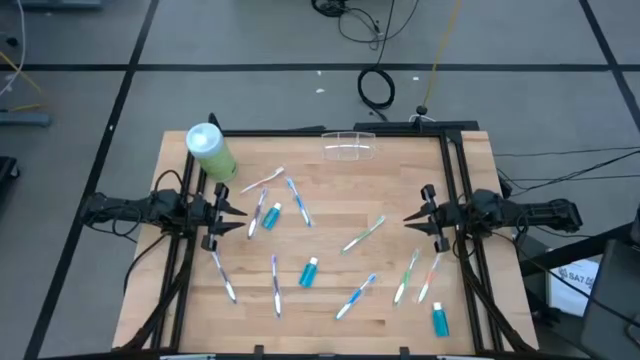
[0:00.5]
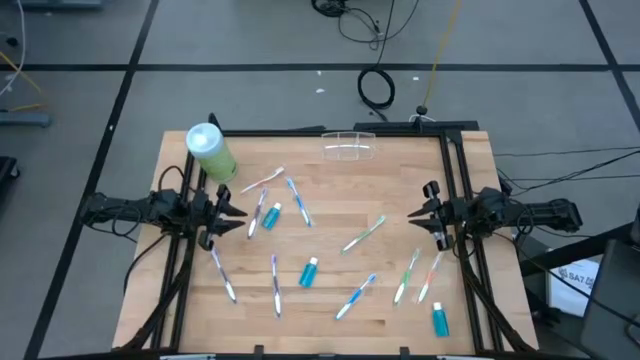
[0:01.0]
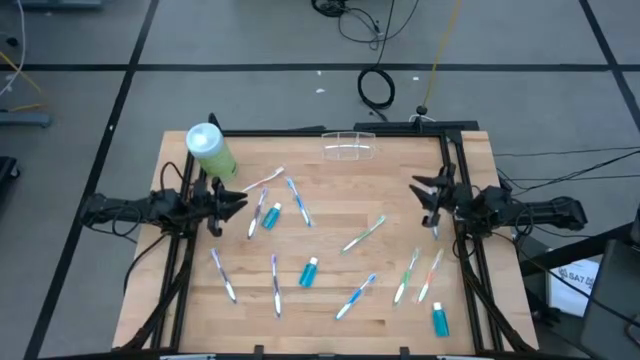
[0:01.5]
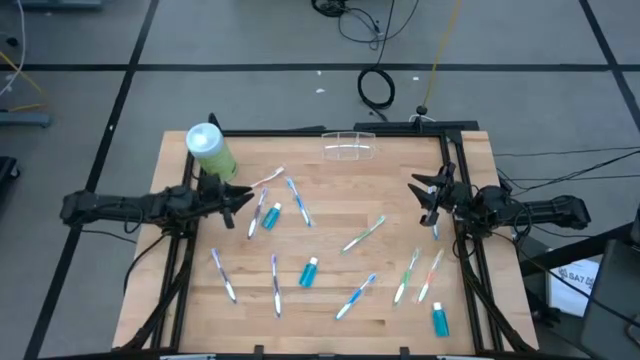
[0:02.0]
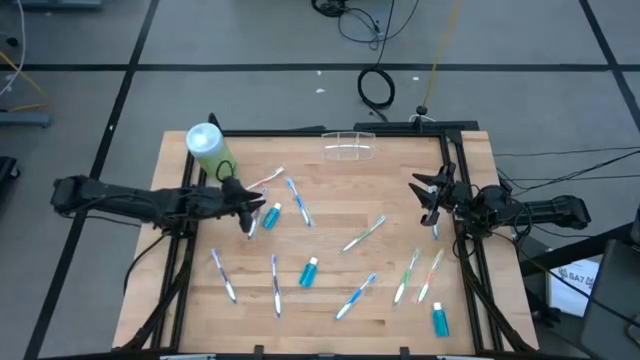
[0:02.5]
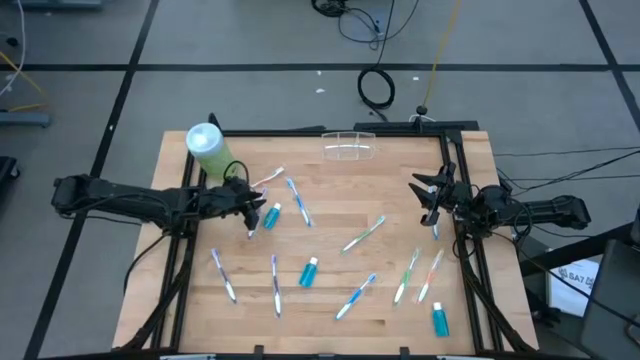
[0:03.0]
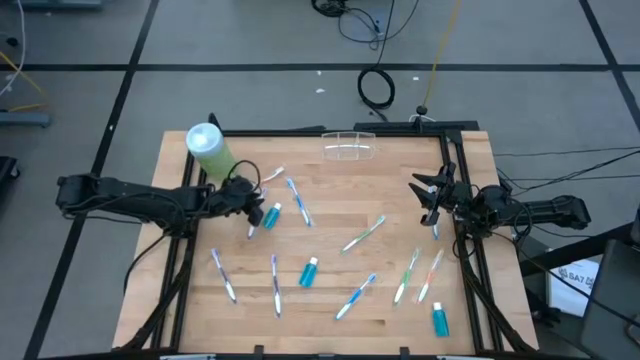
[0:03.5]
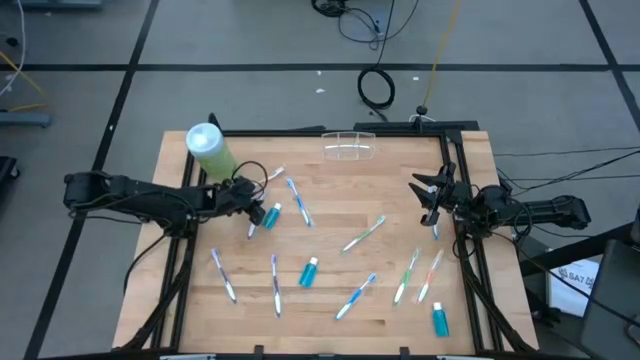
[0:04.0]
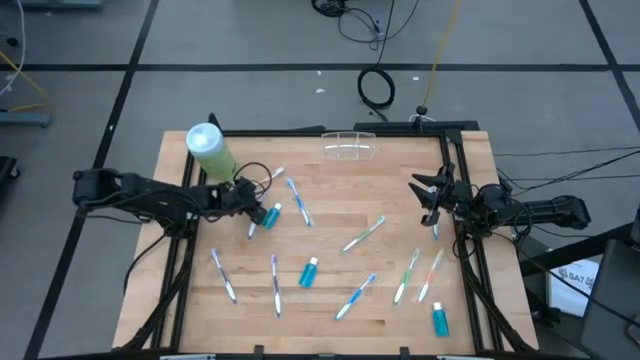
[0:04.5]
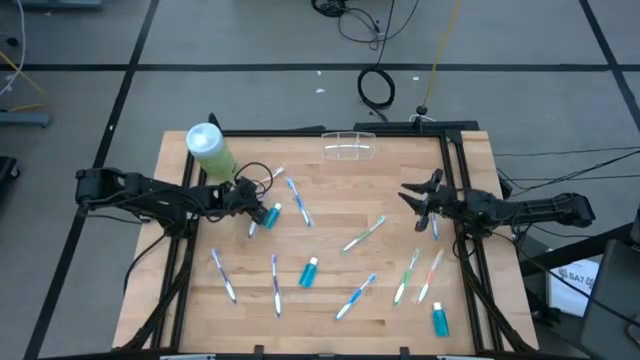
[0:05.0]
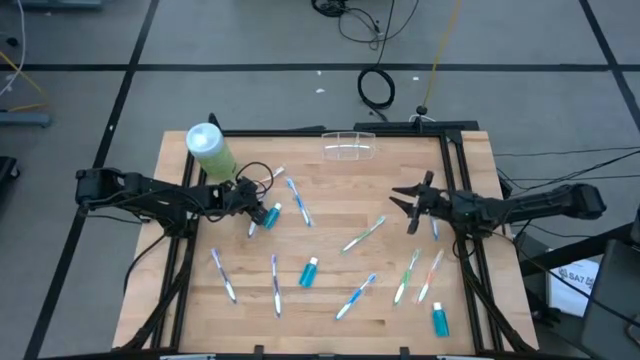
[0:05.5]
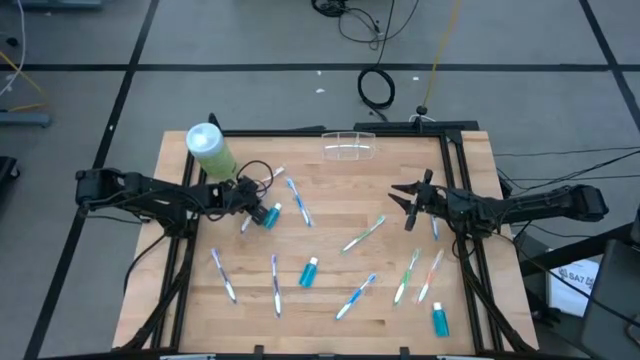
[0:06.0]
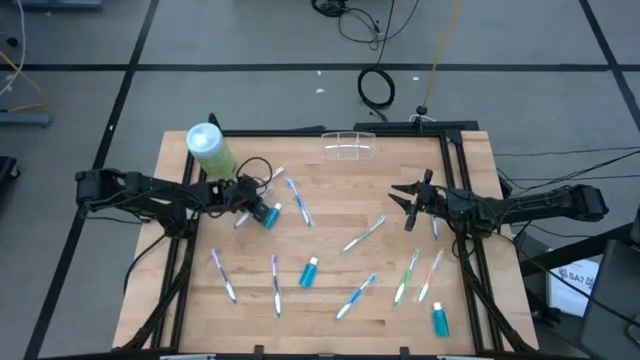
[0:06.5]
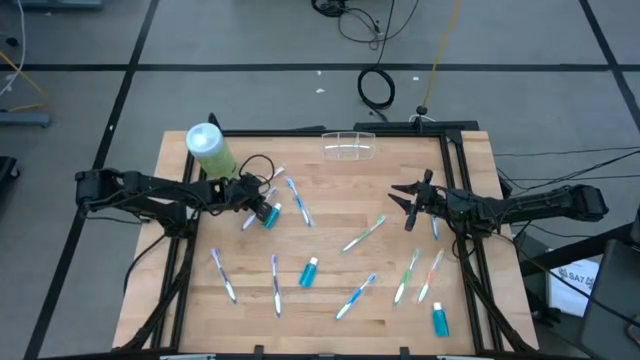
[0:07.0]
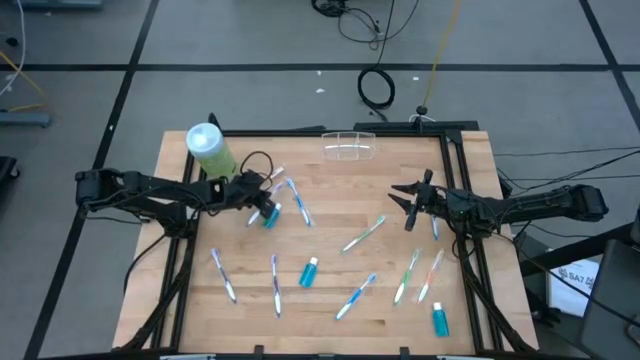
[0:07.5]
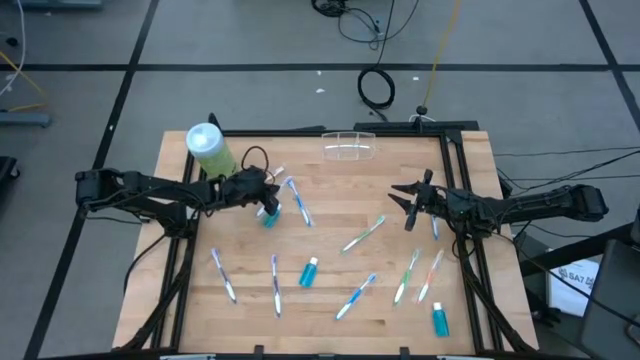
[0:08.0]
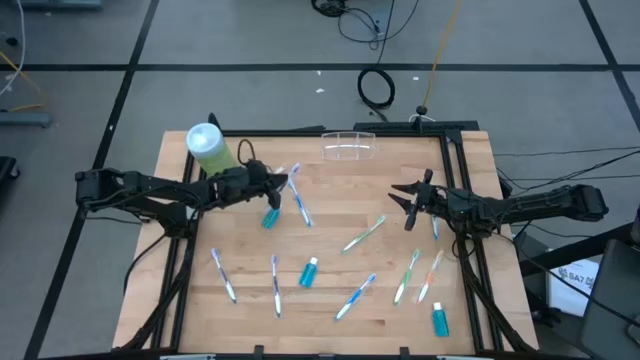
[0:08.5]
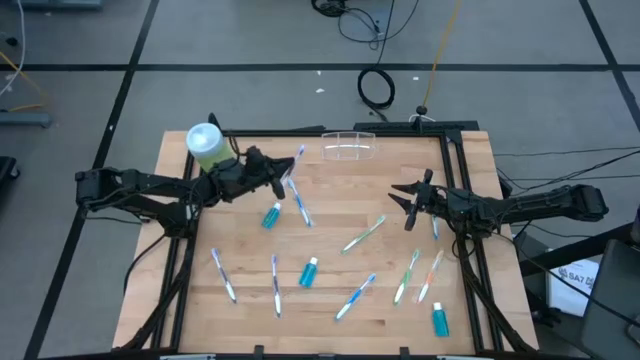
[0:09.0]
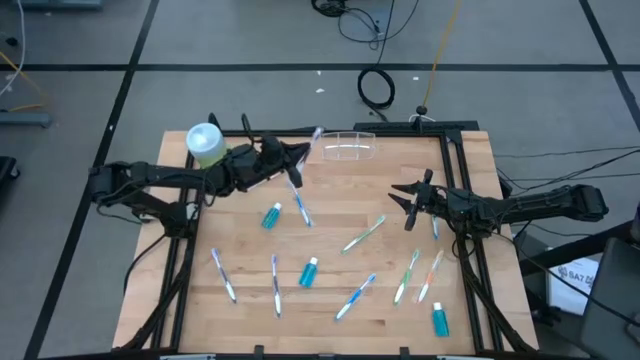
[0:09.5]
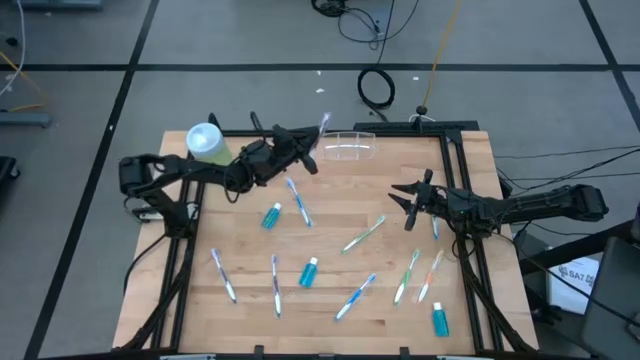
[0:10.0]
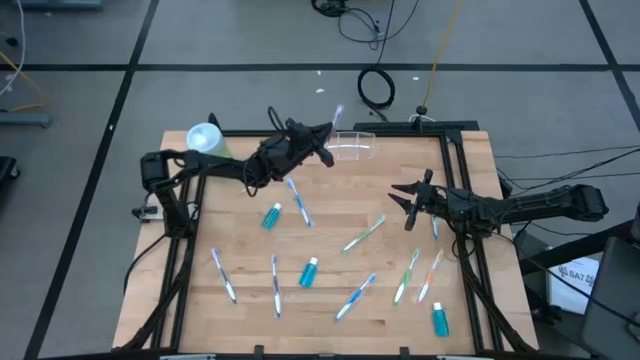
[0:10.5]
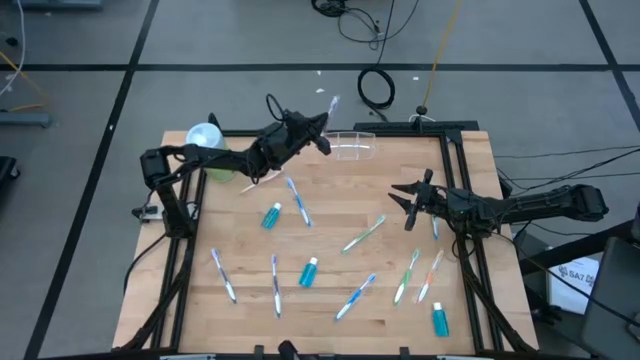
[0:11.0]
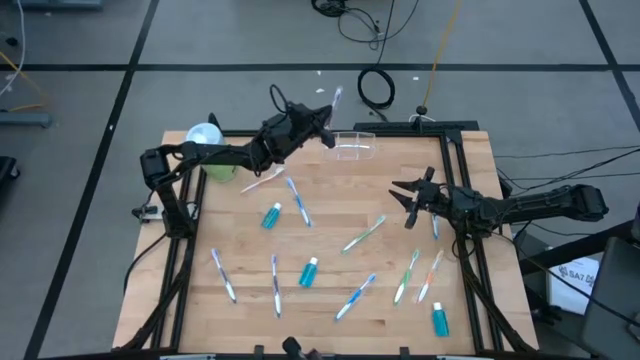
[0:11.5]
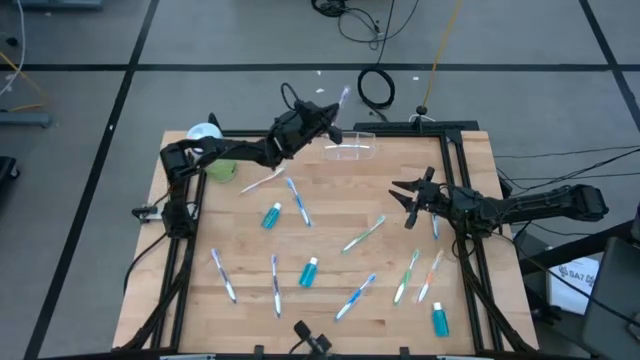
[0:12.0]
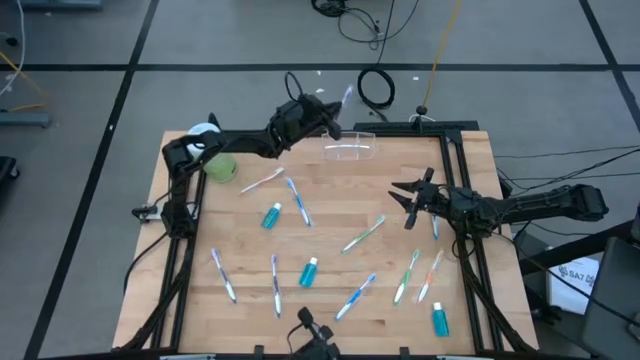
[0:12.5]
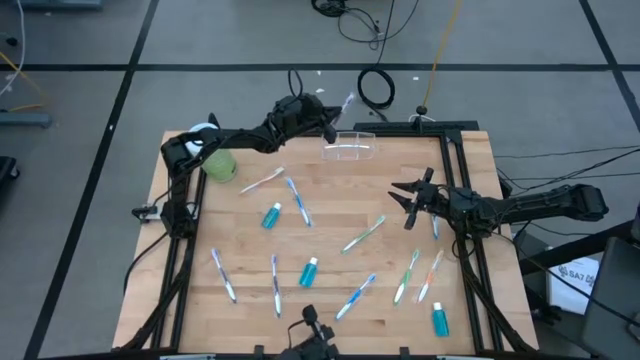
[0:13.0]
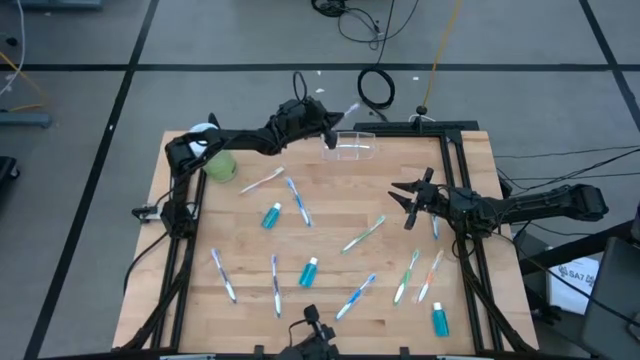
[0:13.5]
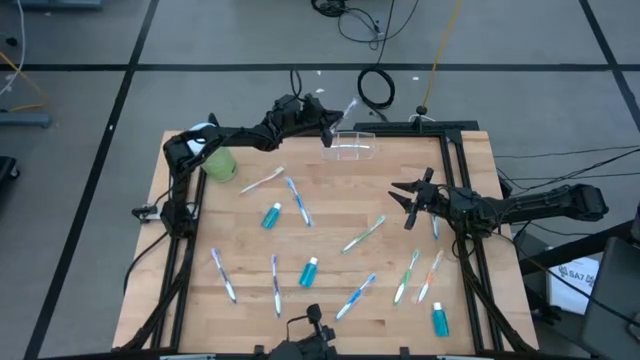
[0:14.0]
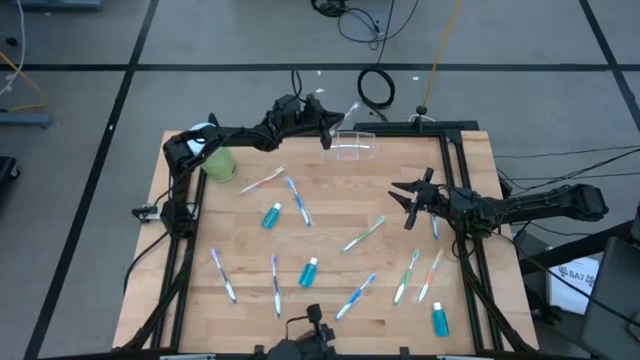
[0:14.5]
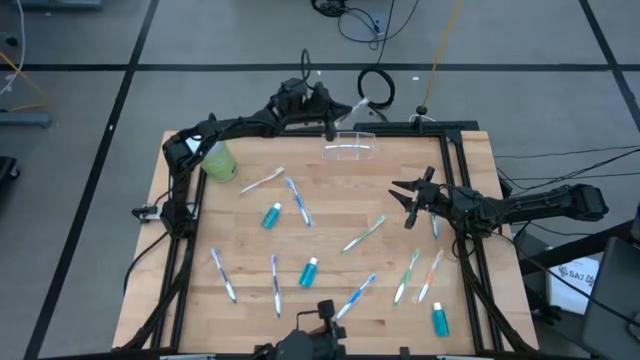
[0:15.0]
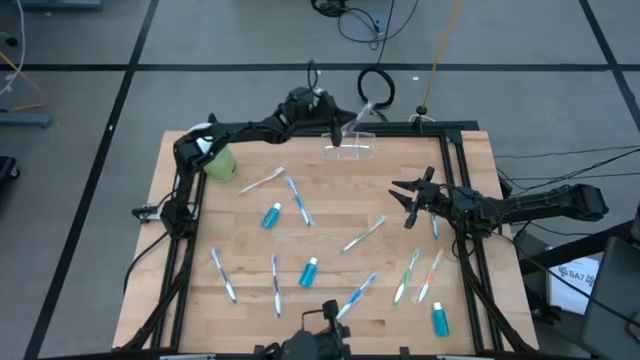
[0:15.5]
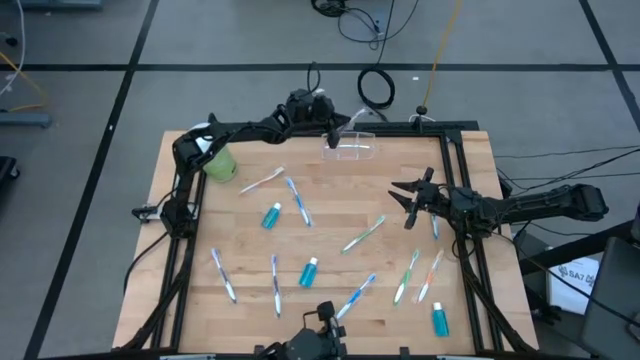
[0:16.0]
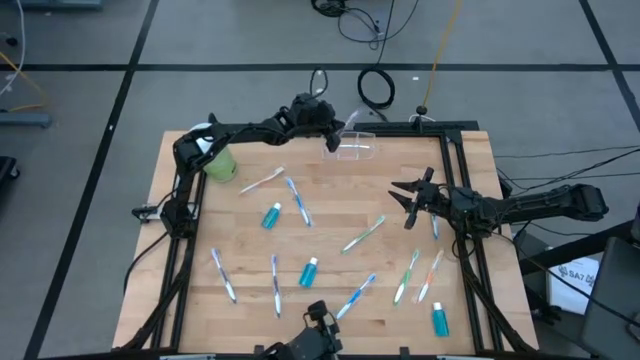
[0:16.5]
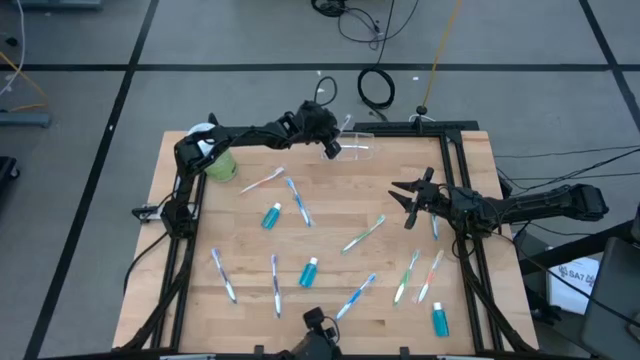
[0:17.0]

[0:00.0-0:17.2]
Task: Pick & Place toothbrushing station
Put the top left purple toothbrush into the left section of the transparent organizer

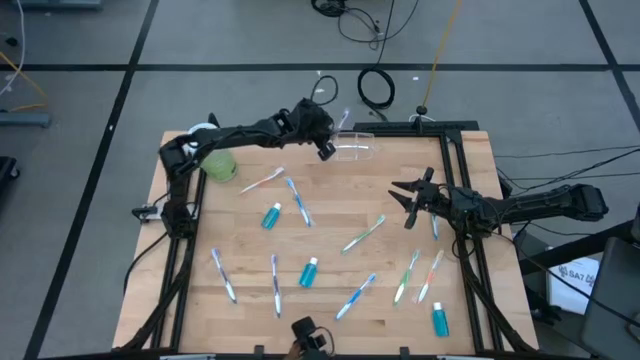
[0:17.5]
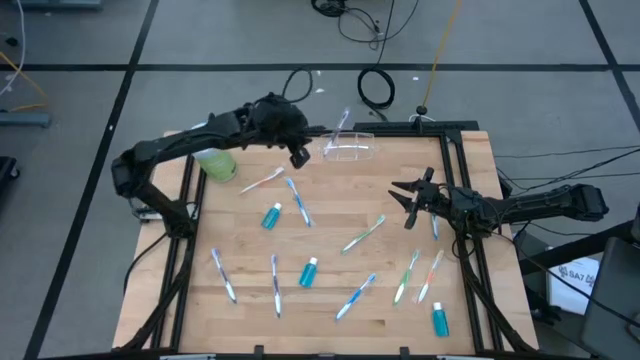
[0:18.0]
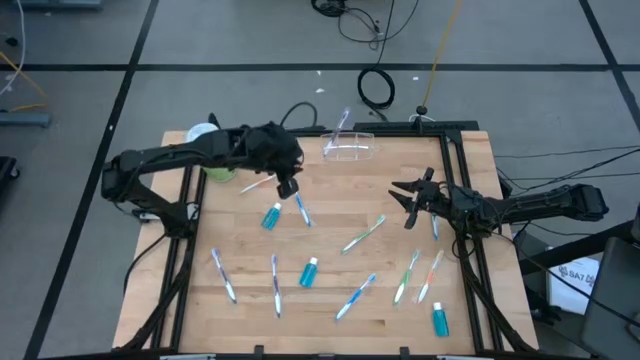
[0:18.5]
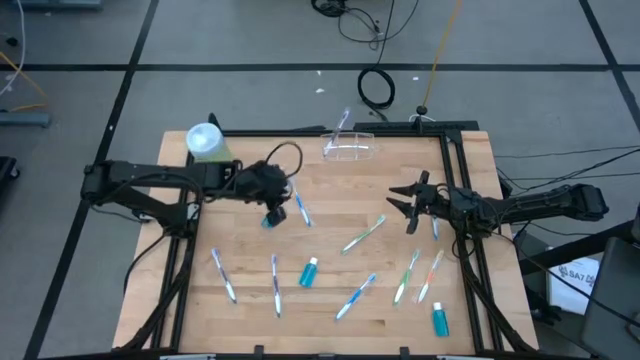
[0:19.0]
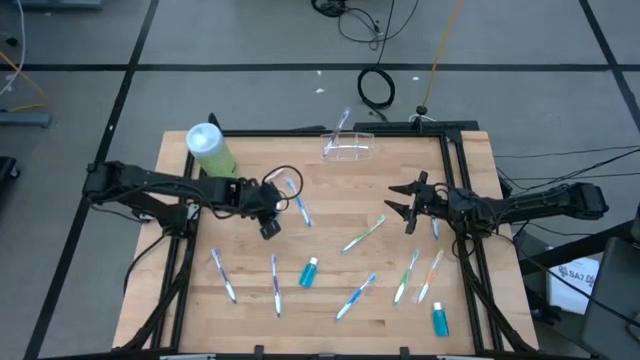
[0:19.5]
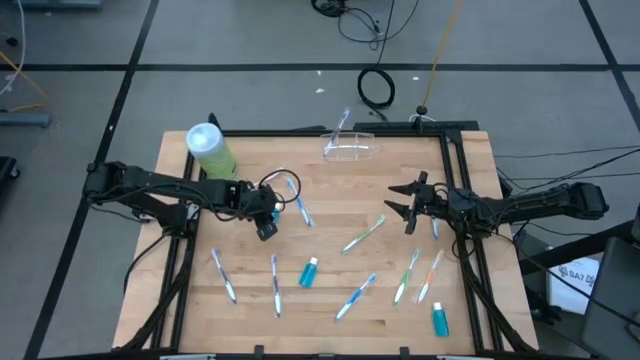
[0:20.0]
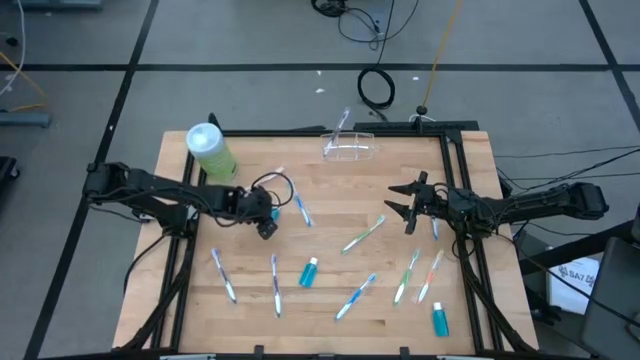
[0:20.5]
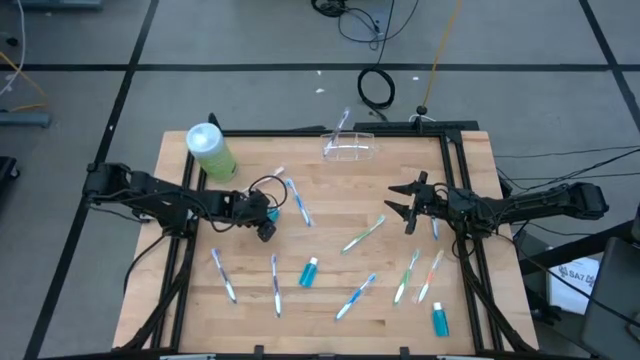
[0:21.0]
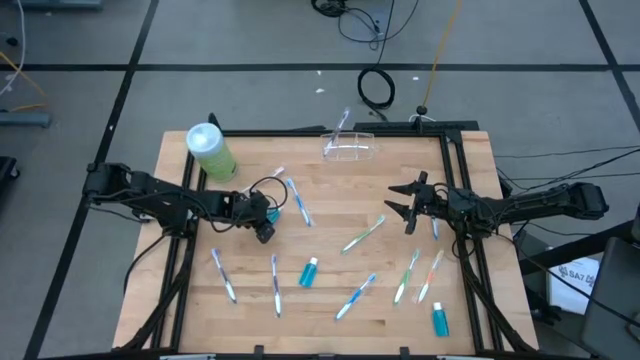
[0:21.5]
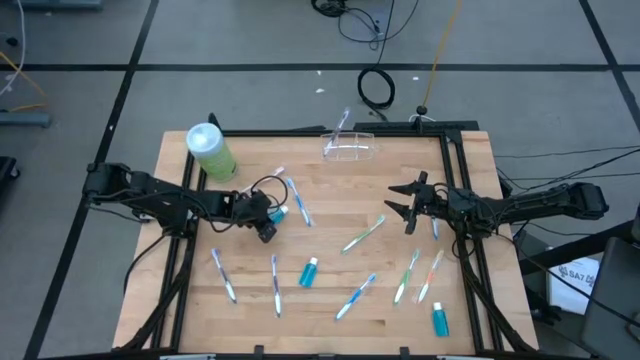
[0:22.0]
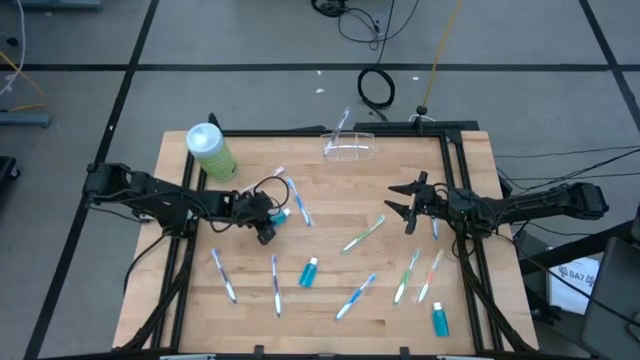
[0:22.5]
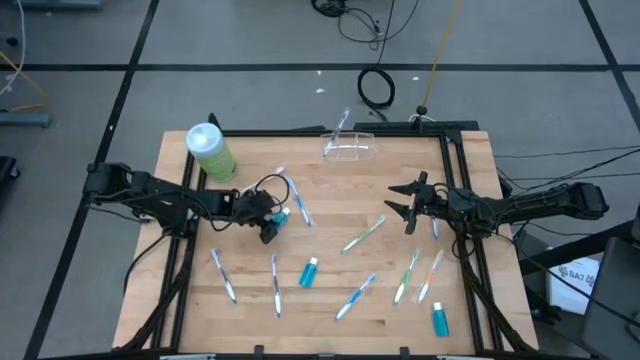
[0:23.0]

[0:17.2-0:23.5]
Put the top left small mouthwash bottle into the middle section of the transparent organizer
